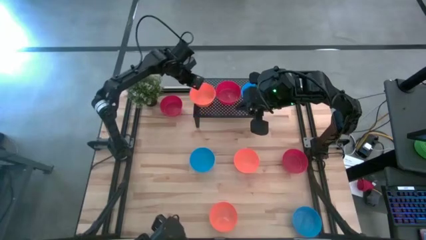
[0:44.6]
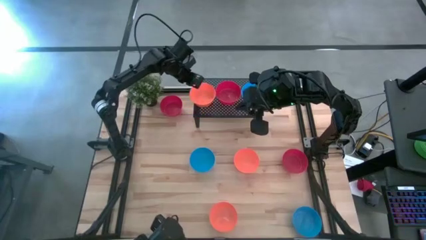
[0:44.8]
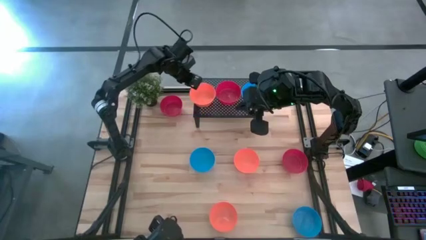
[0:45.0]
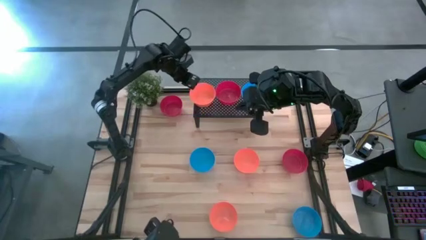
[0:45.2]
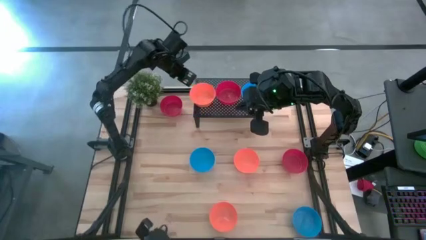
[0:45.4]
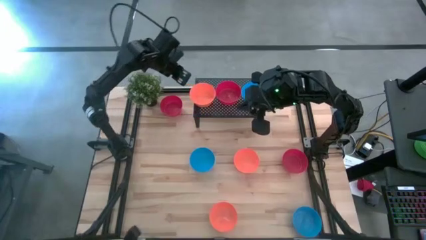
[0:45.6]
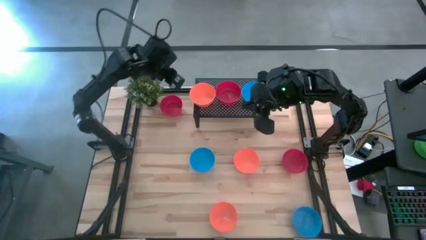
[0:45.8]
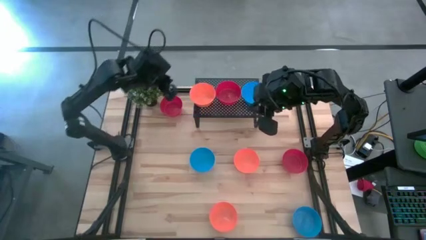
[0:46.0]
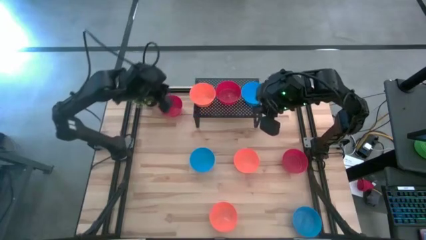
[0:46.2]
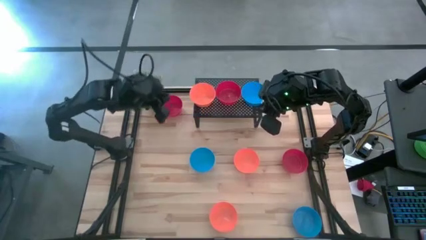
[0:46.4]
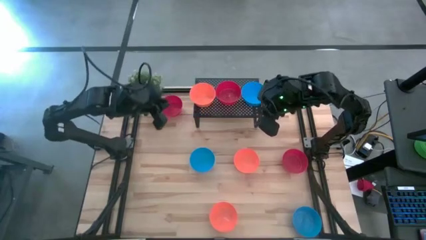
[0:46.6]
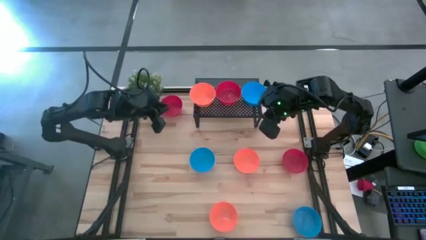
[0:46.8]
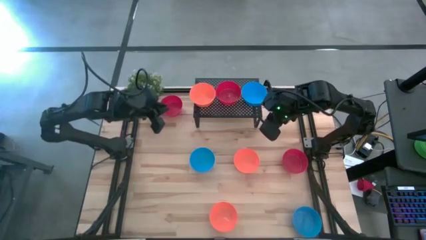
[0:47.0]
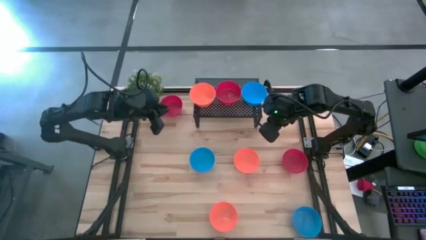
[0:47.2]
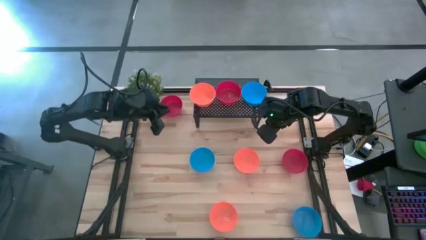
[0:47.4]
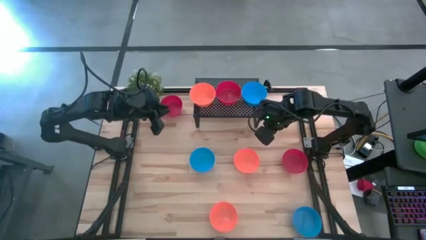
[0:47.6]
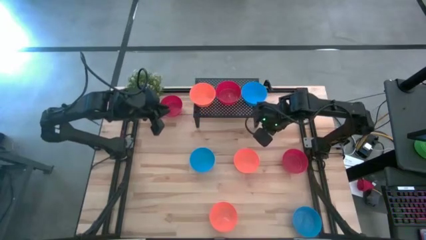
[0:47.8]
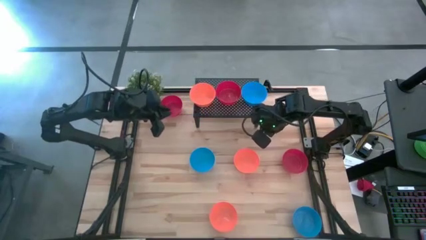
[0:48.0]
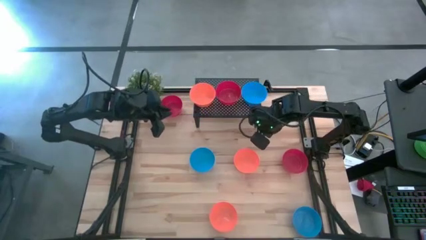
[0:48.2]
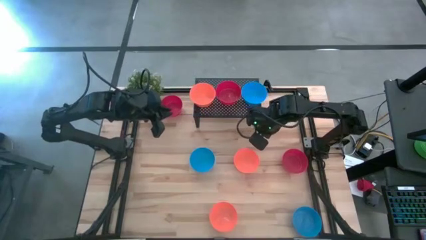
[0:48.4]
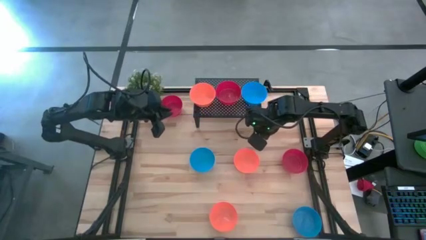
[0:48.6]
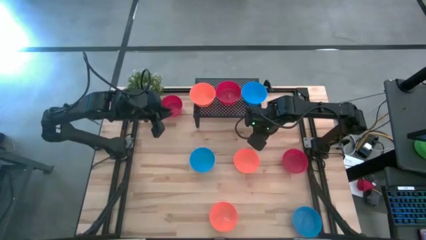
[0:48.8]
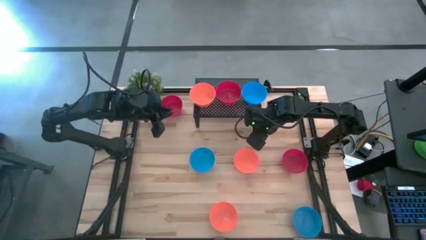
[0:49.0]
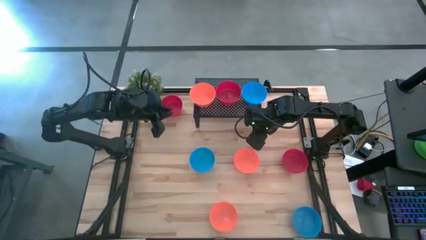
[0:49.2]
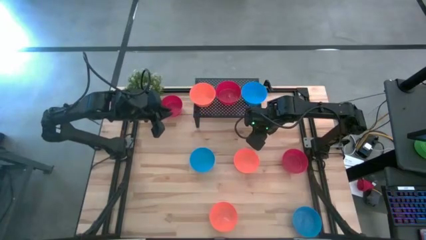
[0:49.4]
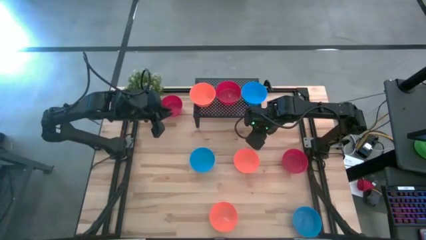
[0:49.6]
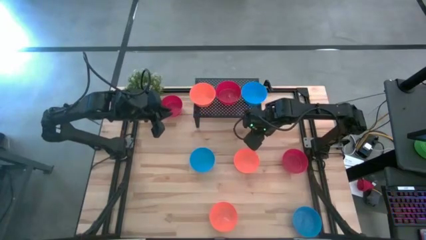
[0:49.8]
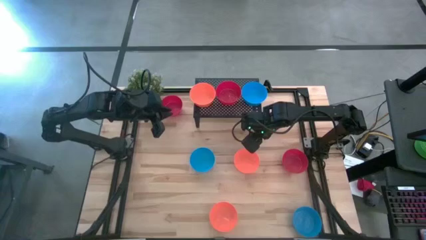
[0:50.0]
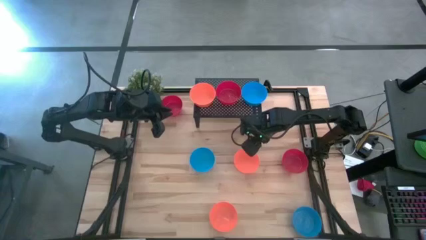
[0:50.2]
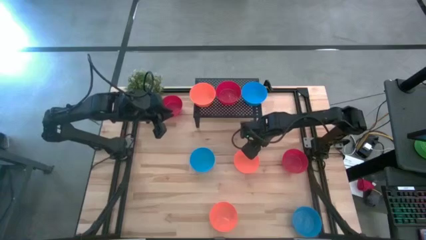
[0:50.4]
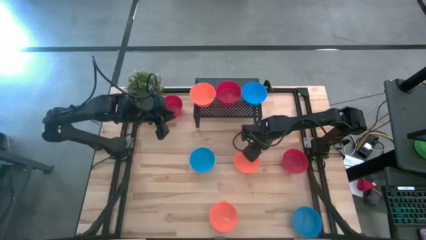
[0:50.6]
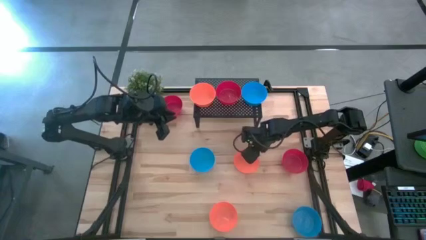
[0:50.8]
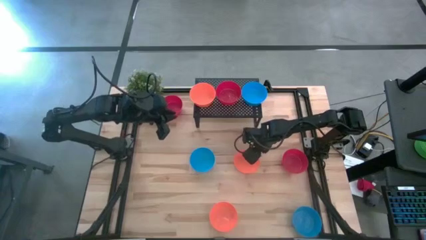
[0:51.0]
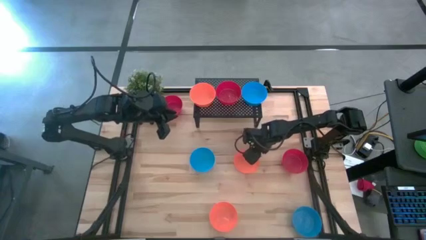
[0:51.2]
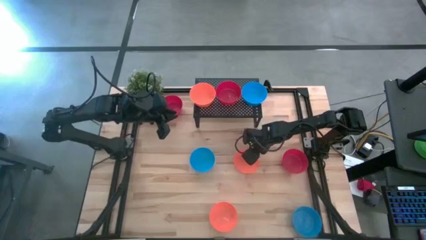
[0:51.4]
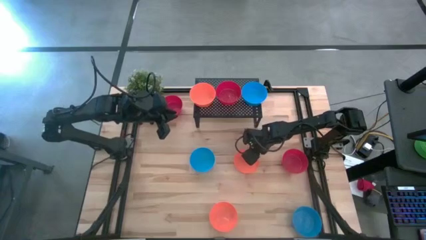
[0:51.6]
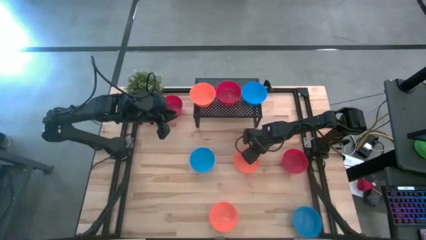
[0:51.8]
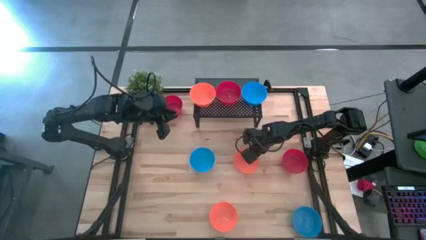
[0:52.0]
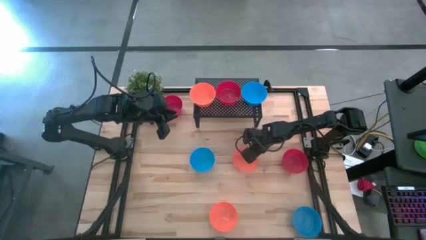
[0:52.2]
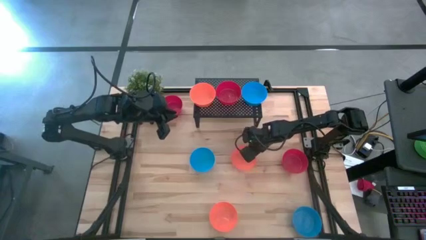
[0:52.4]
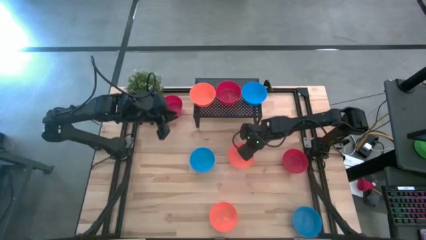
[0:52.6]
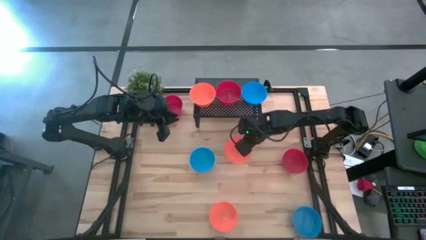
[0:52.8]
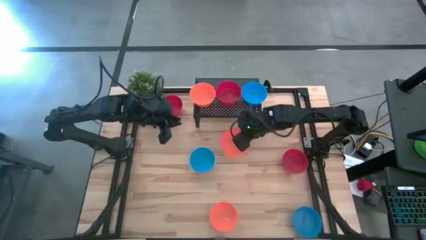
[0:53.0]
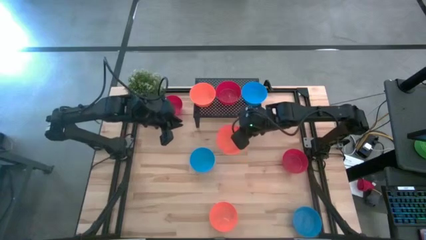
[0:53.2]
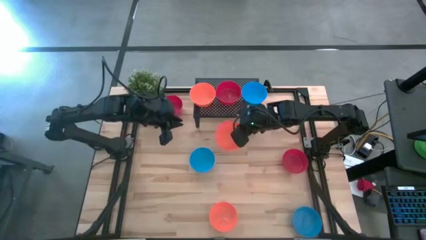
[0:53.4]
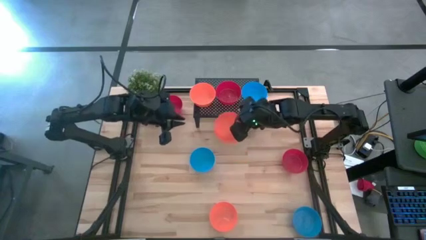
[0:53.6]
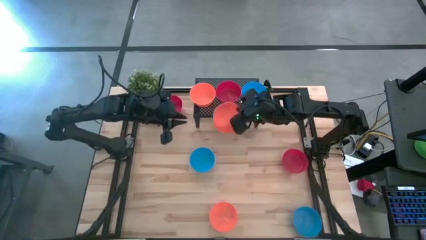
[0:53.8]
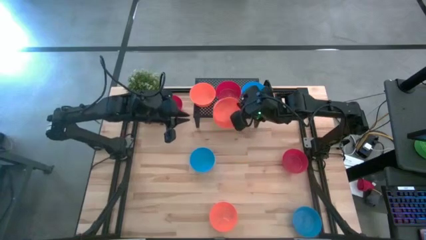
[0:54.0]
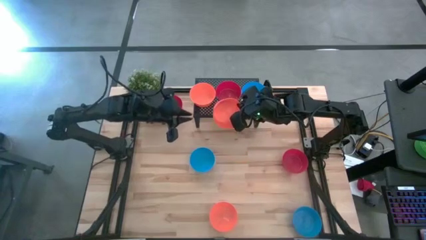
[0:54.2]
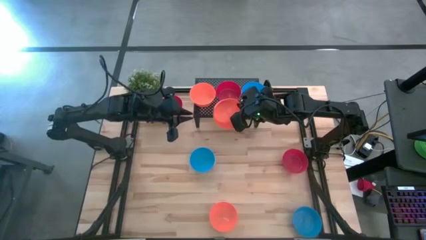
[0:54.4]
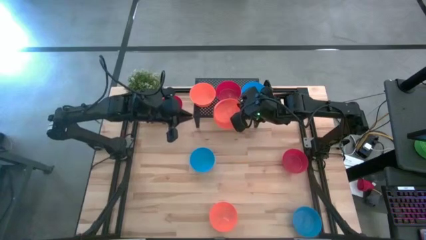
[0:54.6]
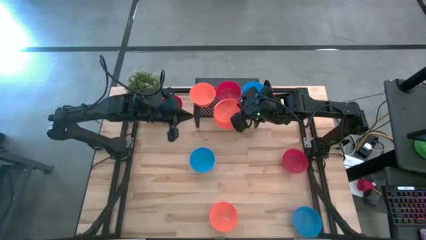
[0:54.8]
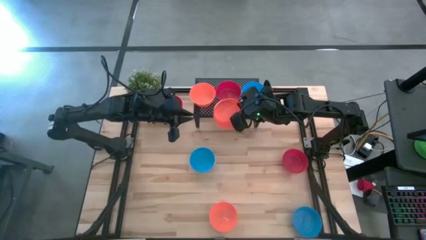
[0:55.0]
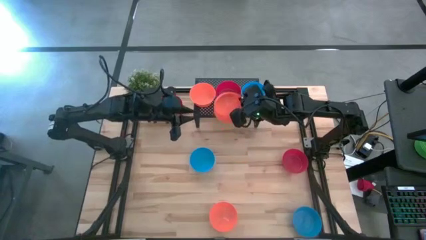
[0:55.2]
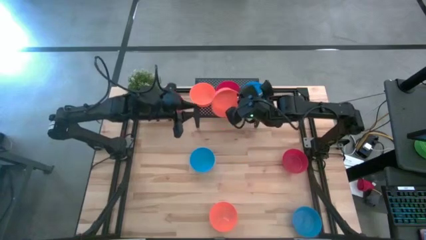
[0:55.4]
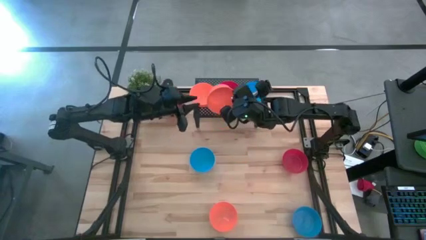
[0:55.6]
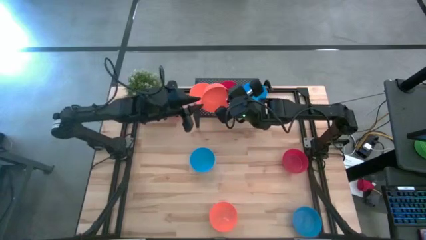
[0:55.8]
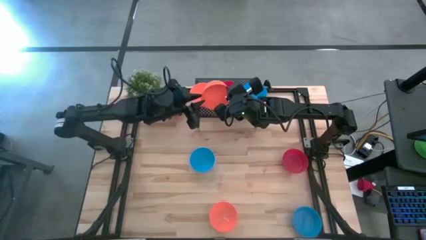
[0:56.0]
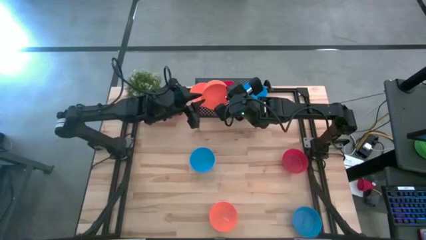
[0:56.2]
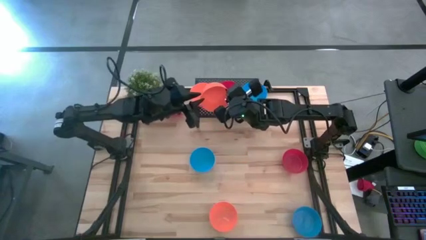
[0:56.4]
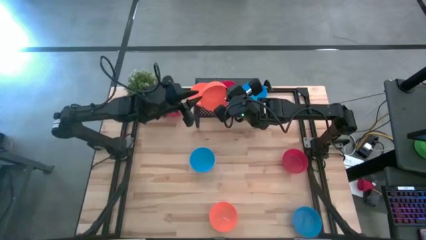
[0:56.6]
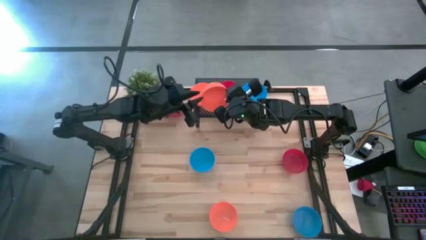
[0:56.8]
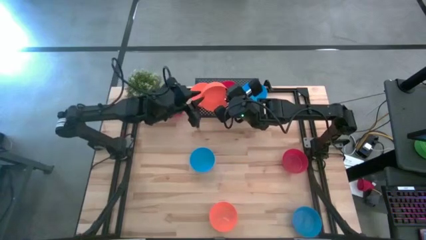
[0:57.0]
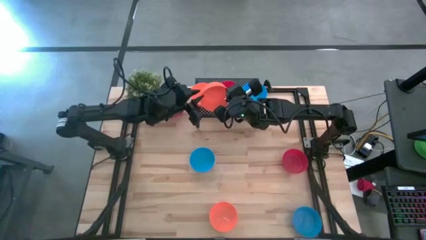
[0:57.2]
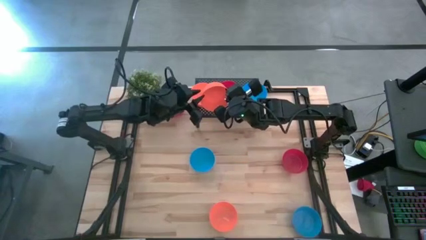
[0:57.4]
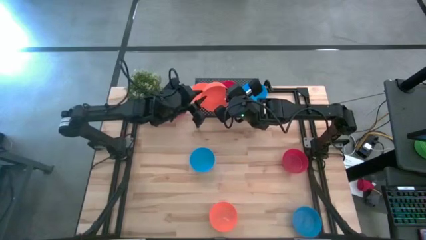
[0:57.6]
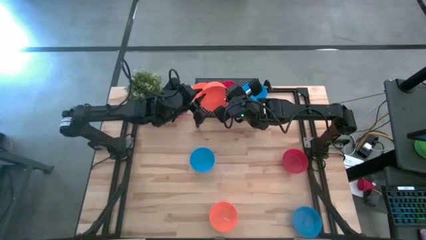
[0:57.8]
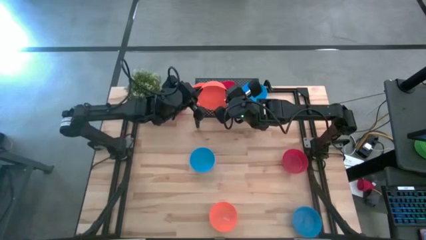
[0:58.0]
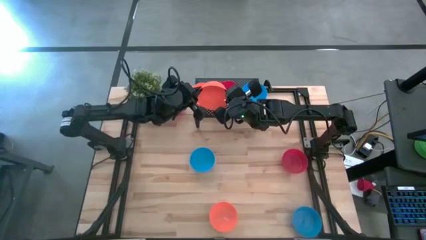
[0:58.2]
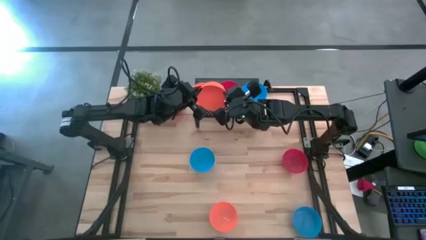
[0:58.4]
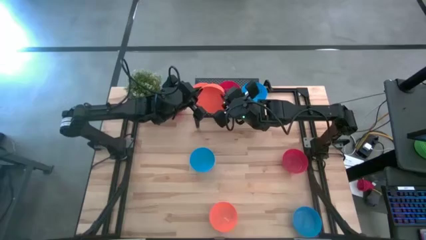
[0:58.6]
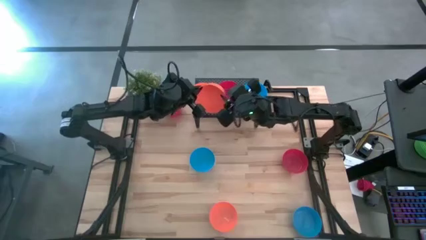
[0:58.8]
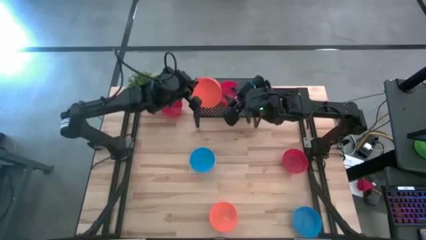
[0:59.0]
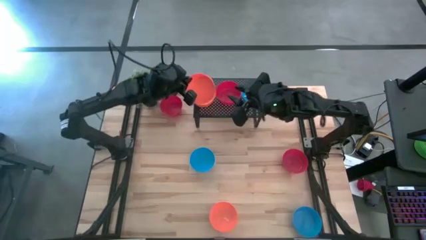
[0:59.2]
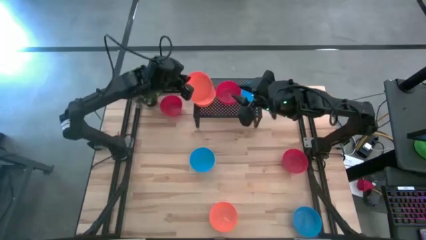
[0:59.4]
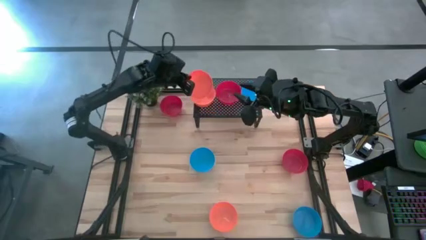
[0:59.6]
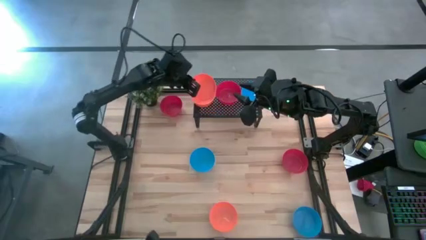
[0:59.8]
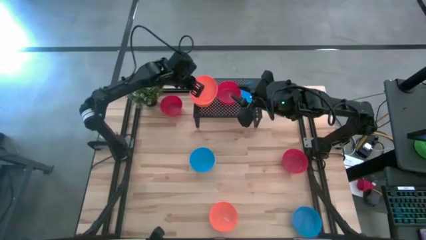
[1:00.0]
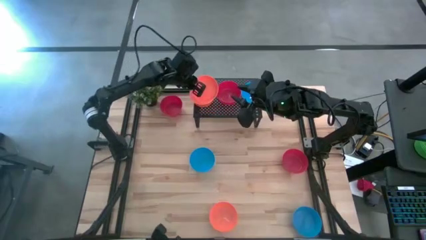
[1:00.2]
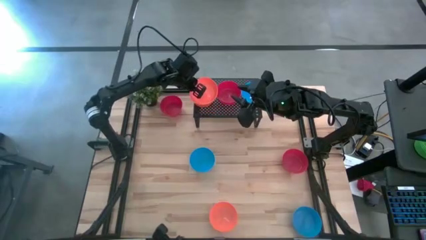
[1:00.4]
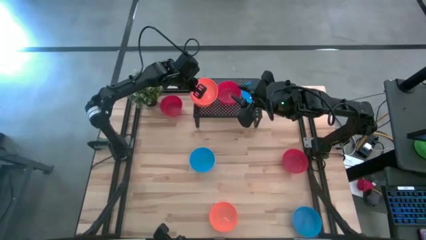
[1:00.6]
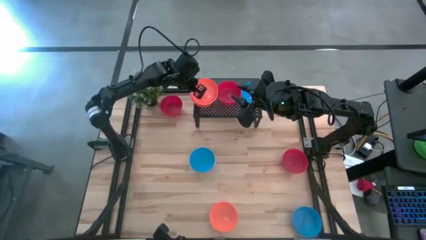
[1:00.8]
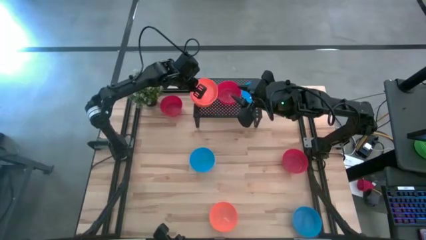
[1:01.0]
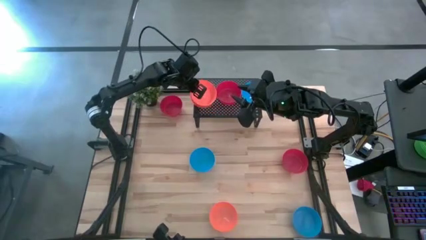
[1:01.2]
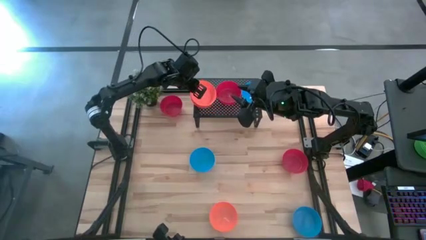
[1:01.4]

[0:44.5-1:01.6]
Task: Pick & Place Mini bowls
Stack the top orange bowl on top of the orange bowl on the shelf
